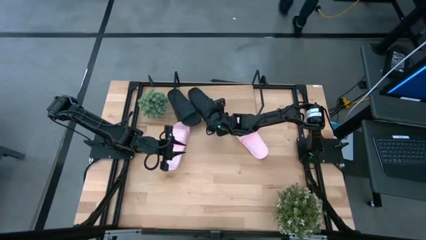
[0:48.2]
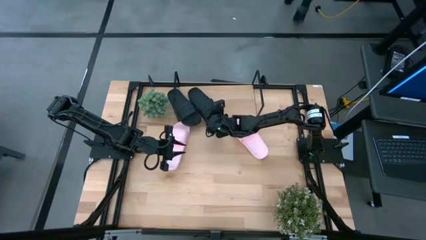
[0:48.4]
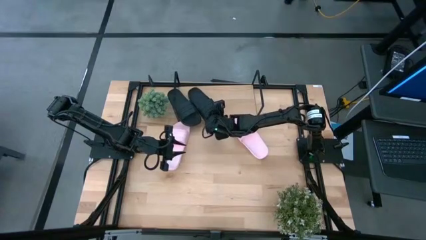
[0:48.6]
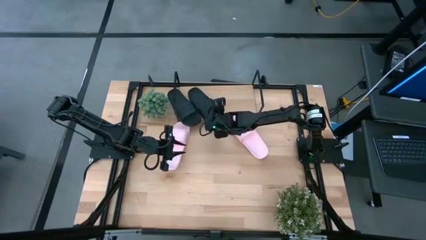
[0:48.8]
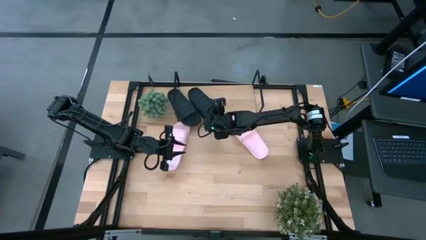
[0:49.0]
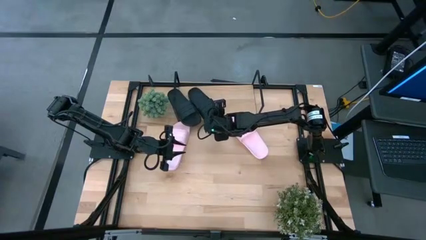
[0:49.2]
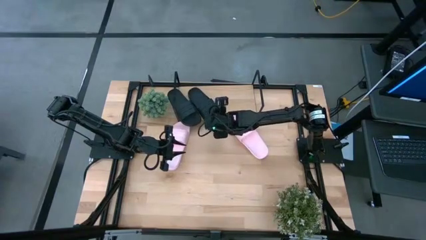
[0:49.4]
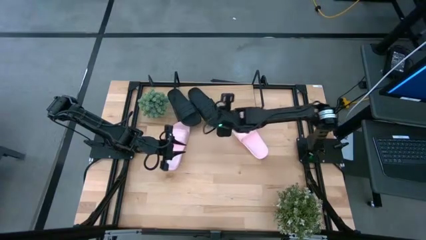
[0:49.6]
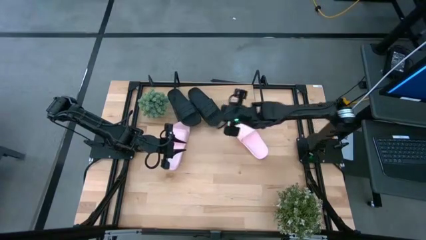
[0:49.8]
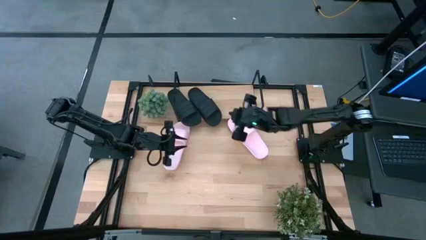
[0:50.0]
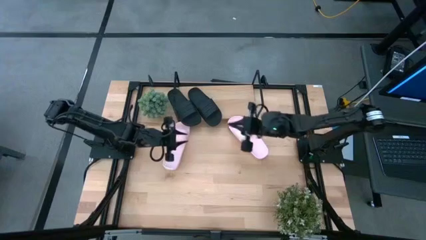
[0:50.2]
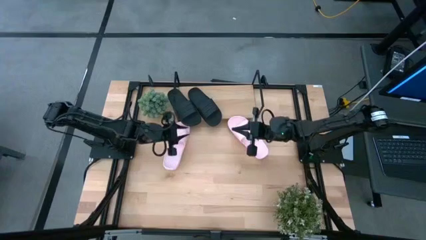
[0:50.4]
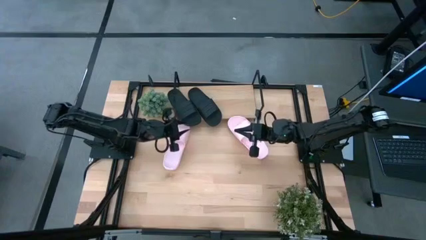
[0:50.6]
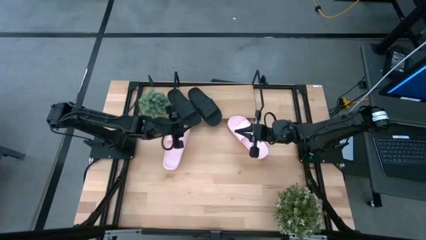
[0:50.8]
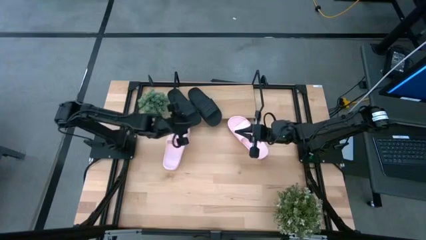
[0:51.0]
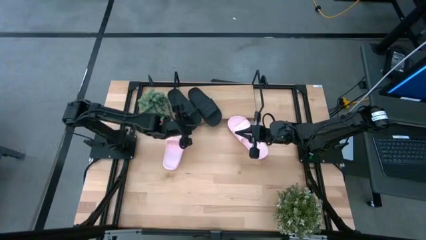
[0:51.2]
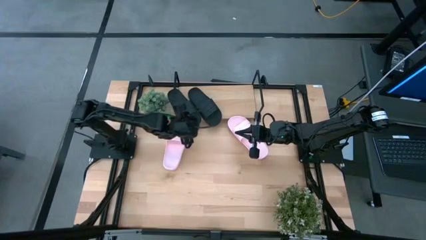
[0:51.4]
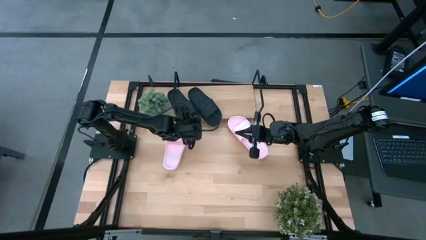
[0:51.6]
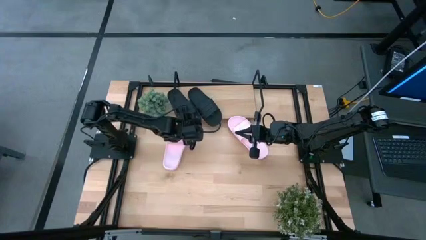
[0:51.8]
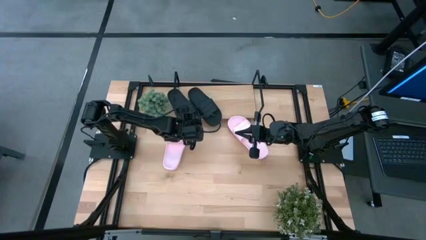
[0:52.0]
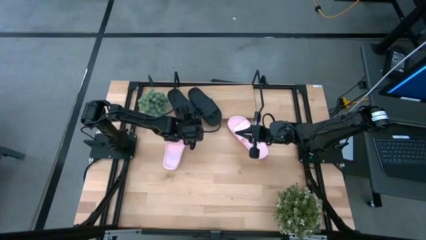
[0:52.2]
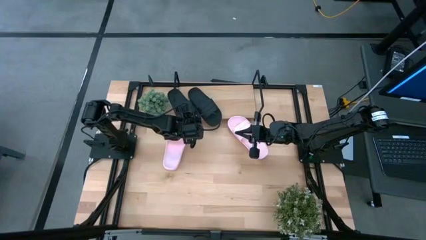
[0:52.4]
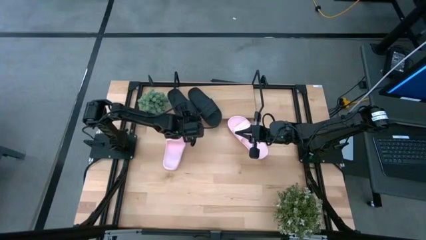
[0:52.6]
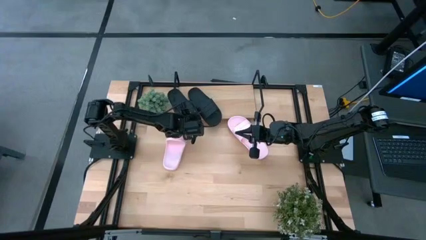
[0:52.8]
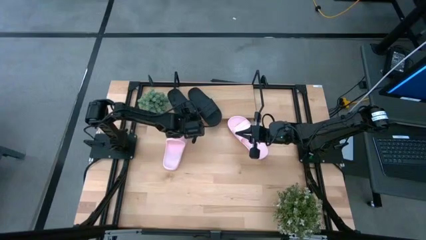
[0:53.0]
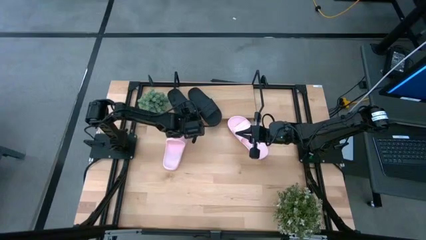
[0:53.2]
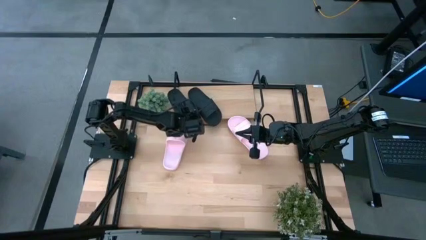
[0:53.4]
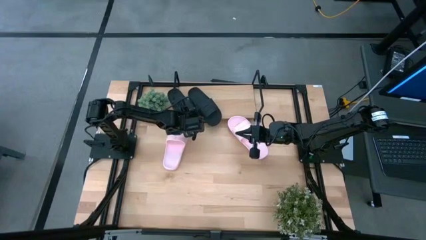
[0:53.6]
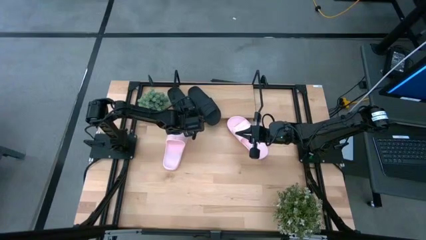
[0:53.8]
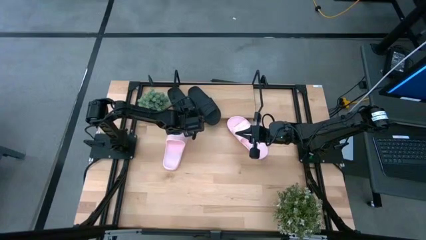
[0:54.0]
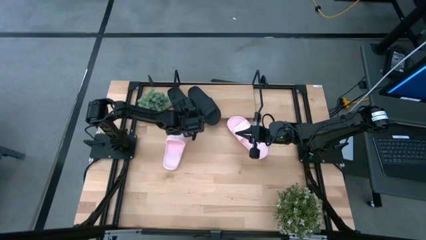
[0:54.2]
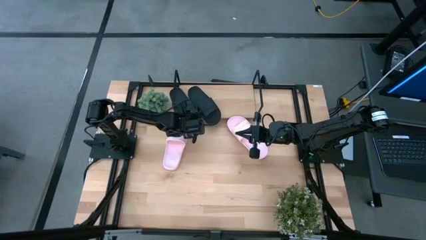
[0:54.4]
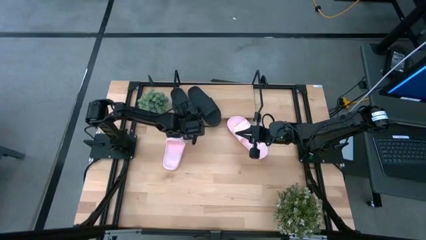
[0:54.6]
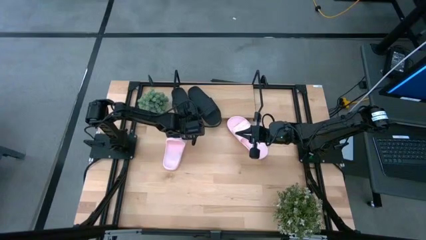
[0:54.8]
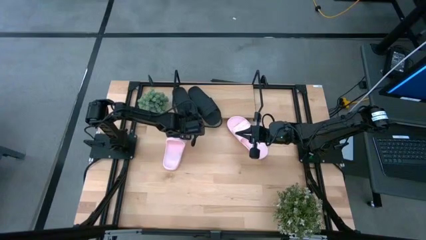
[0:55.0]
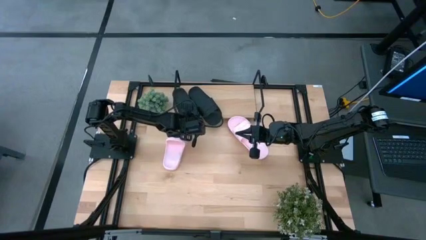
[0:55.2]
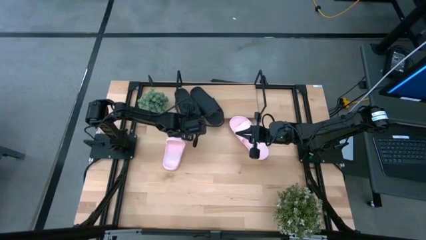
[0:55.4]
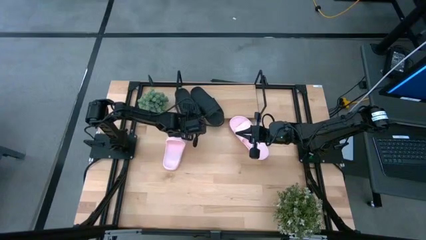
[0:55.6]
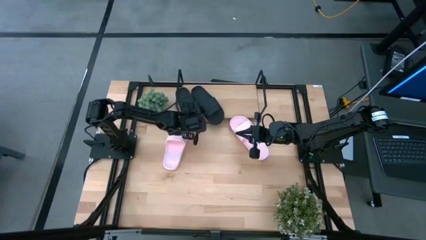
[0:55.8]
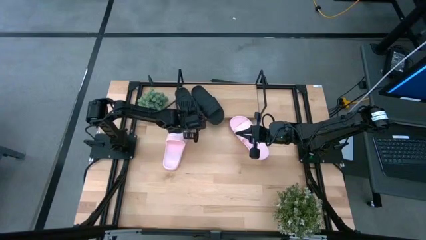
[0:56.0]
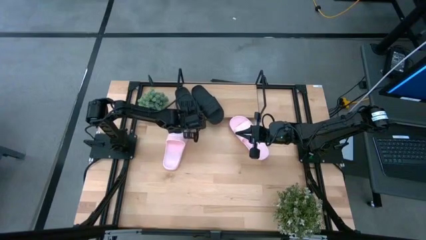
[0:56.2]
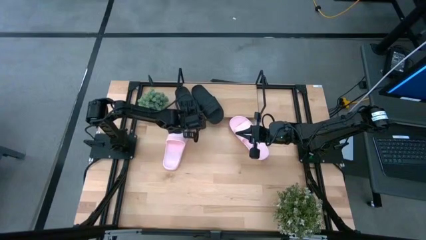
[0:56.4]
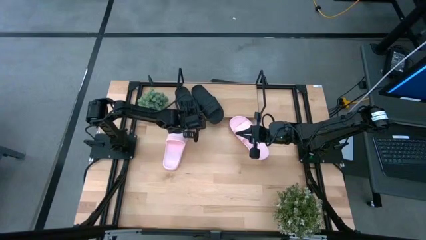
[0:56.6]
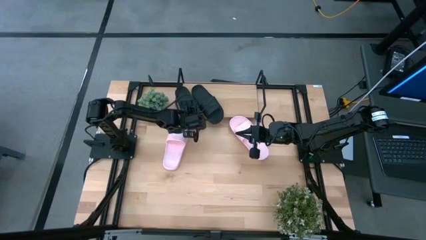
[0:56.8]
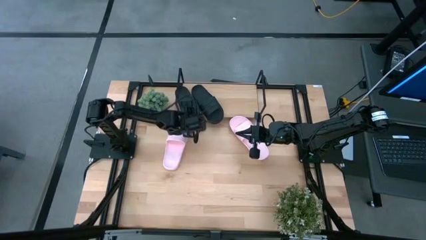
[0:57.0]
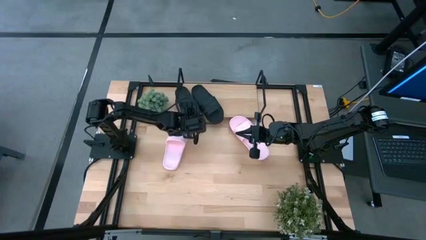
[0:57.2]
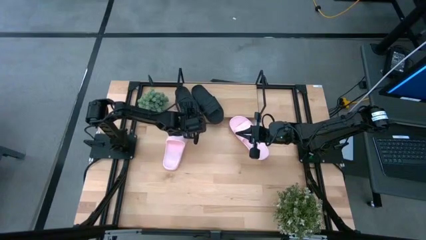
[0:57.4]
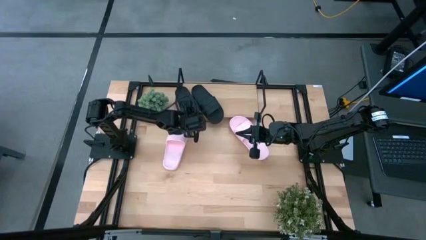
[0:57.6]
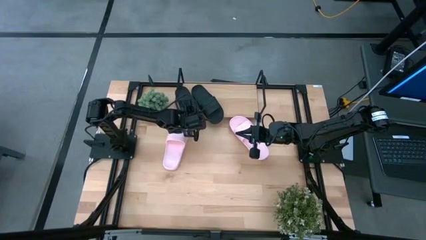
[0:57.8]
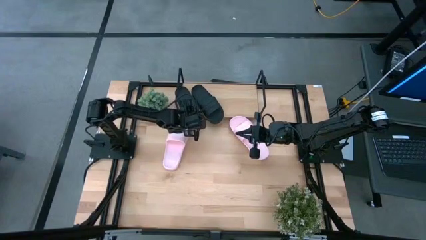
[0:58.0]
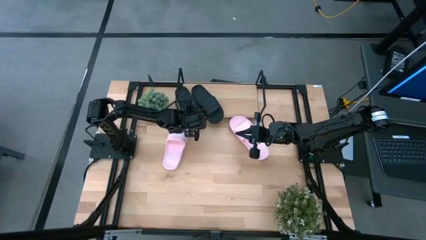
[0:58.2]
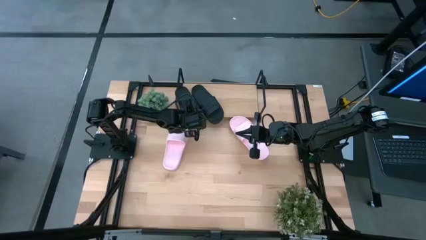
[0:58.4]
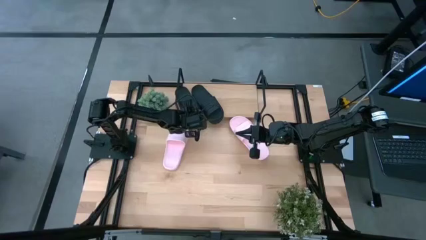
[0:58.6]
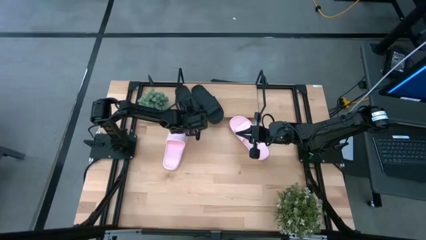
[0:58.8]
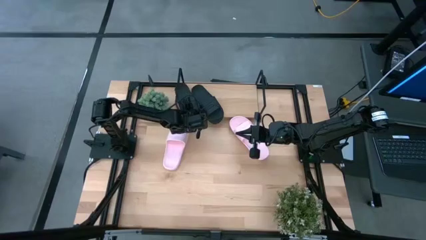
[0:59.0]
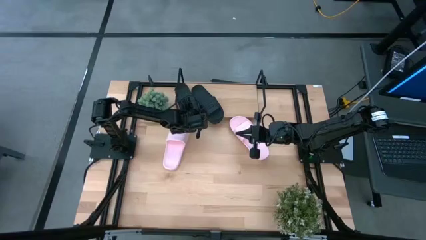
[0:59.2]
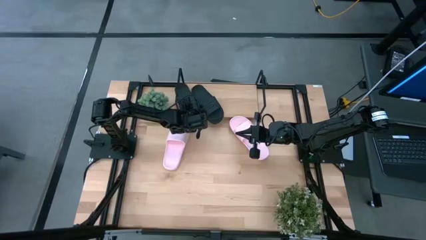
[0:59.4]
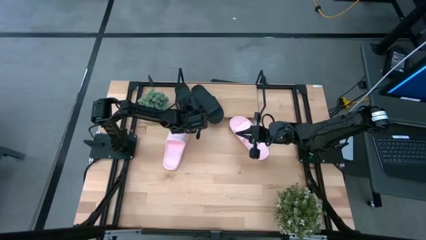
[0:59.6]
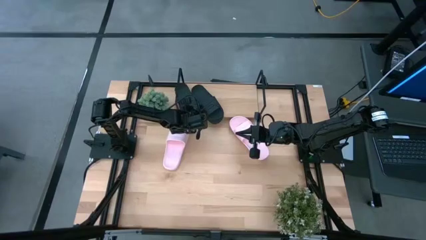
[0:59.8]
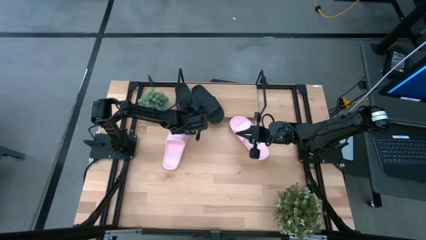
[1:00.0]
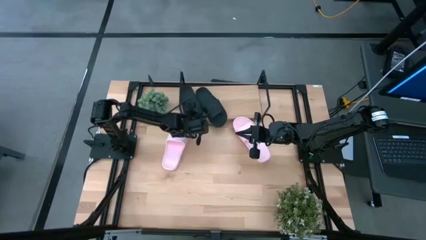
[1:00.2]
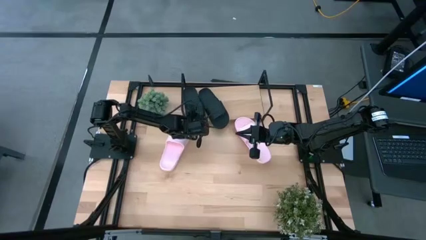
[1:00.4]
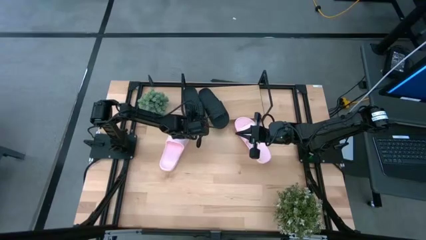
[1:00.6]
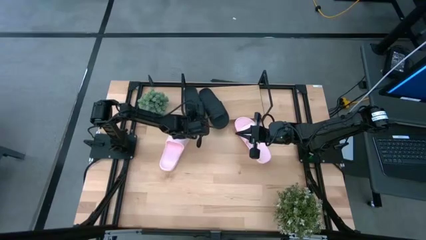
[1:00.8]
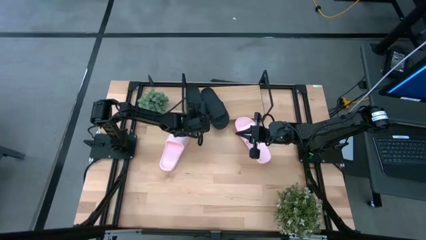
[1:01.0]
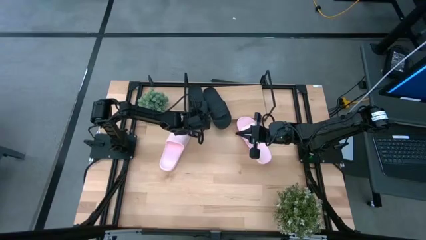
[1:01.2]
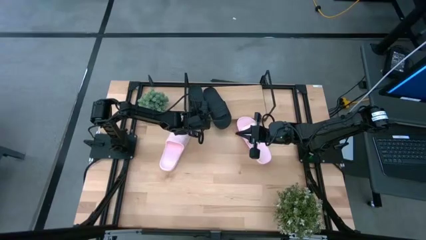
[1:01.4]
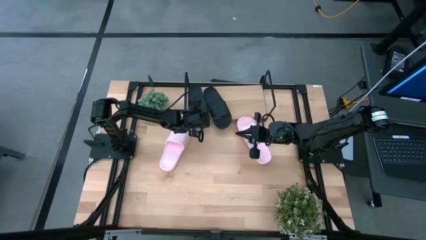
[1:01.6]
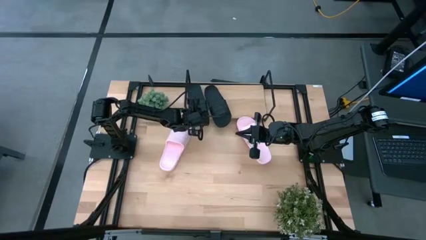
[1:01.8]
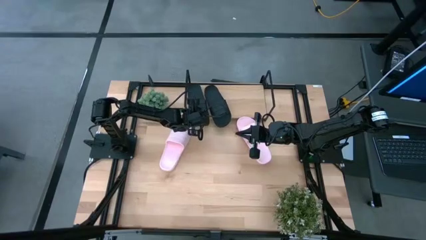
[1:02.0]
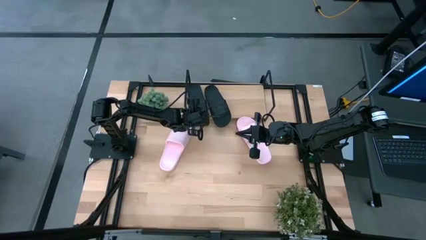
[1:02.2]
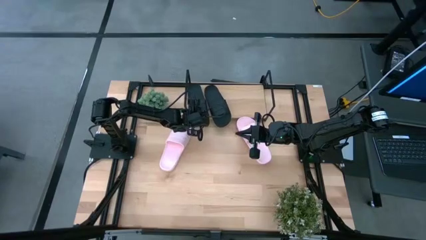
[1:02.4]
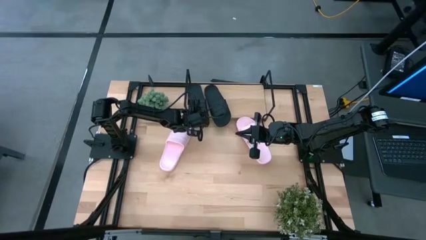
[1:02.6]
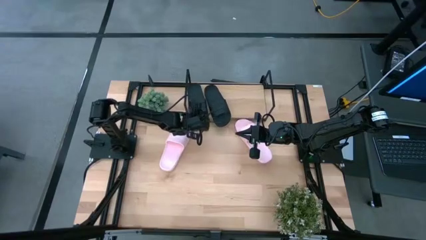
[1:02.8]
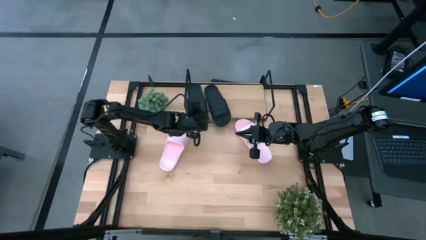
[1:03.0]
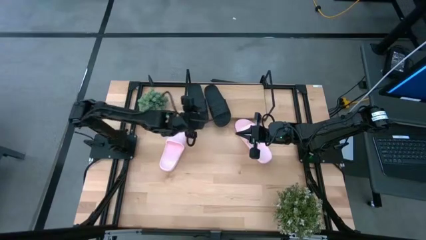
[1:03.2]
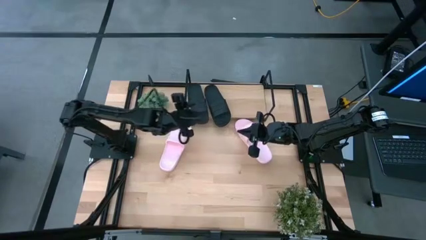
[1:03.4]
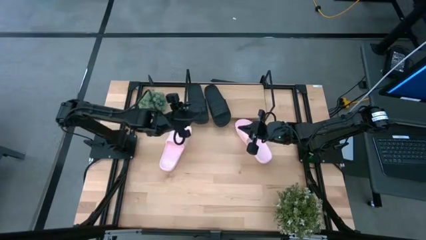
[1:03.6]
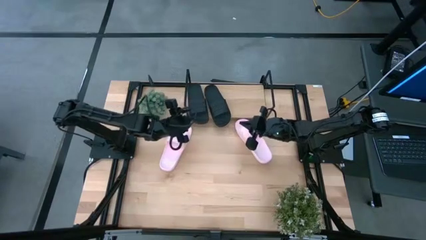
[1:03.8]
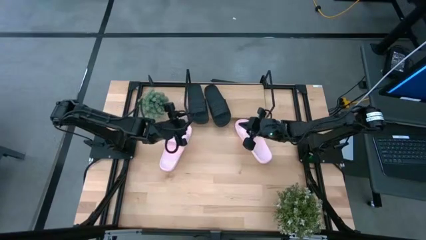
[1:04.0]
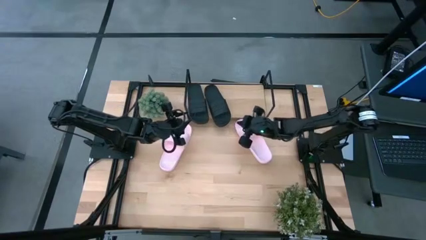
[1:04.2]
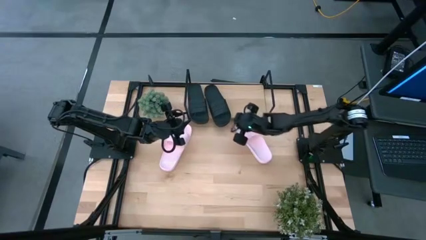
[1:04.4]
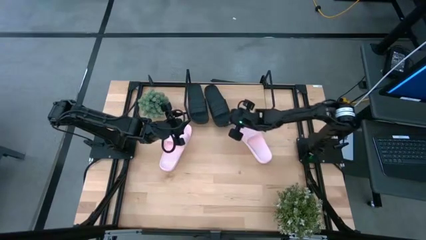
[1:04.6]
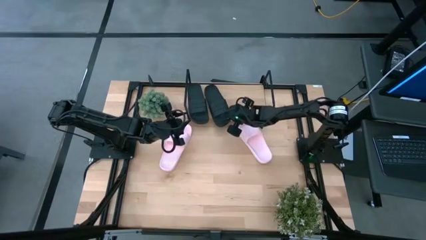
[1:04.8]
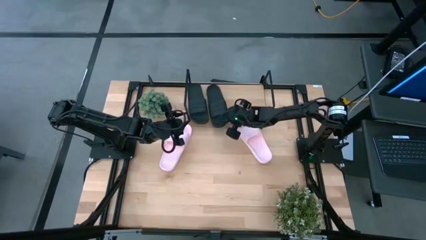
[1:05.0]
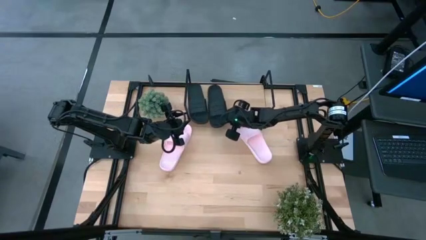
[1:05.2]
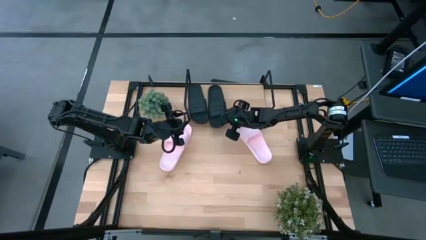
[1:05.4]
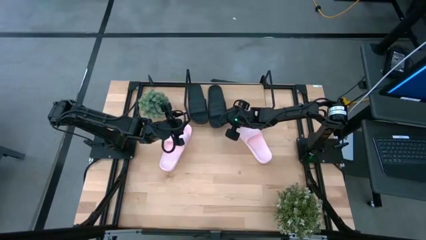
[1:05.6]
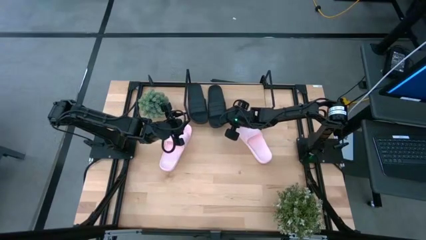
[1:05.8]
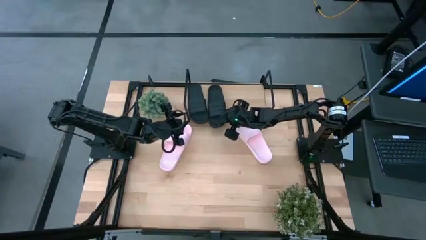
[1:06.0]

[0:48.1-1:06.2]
Task: Pick and place slides into the shelf
Adjust the black slide on the shelf
